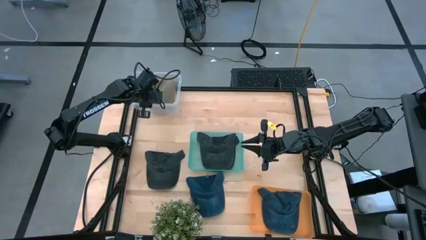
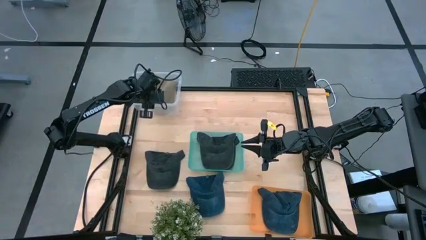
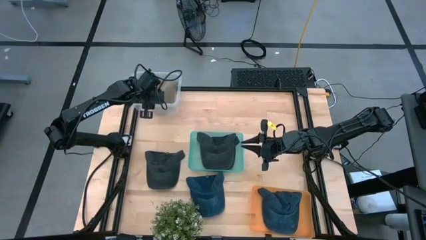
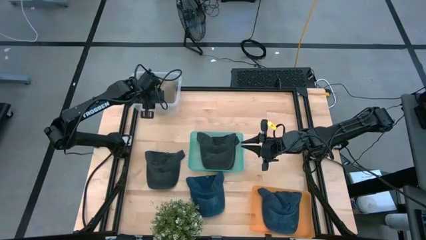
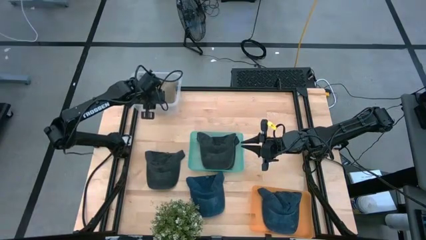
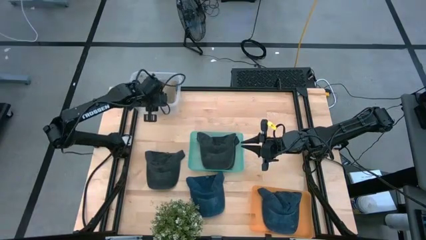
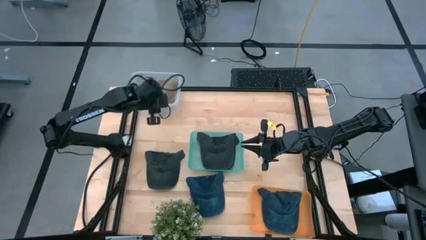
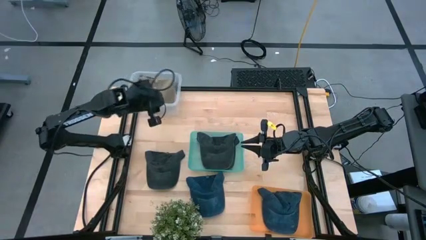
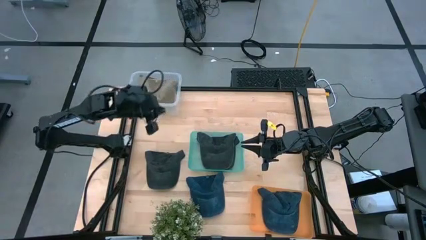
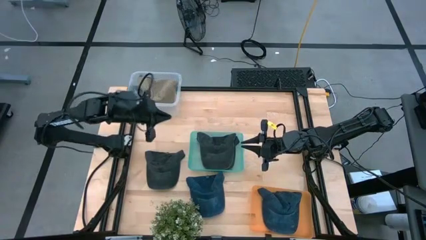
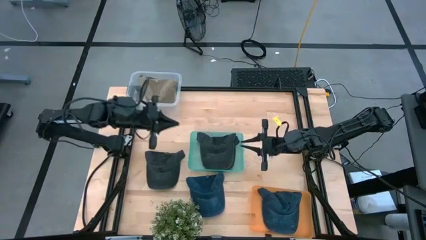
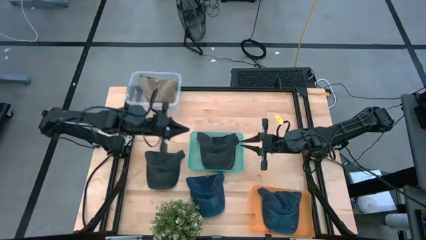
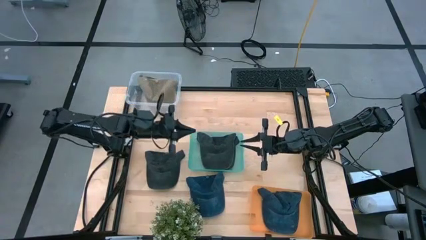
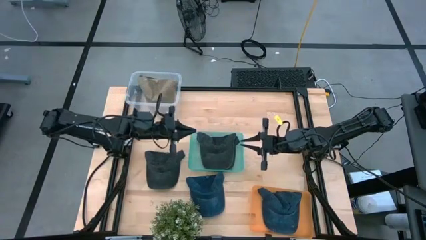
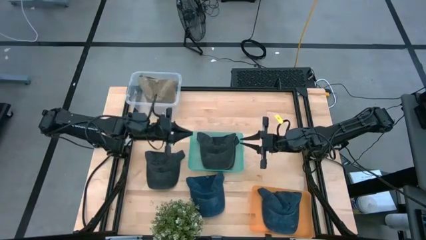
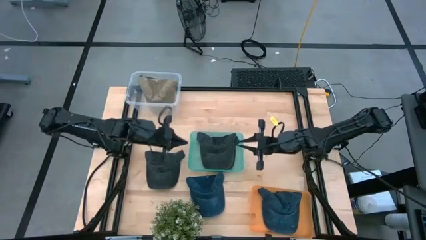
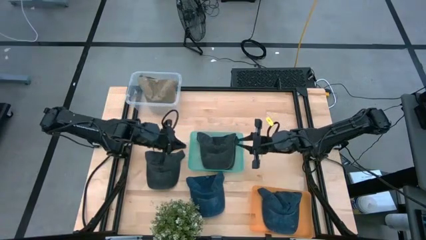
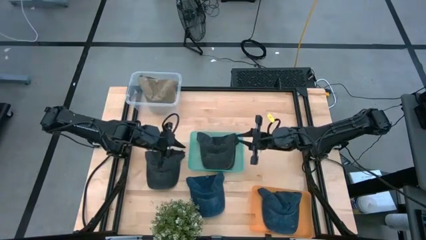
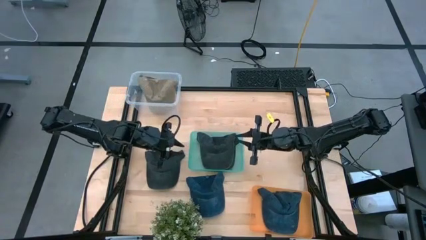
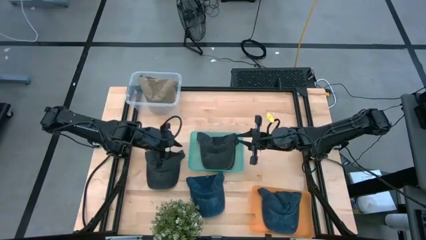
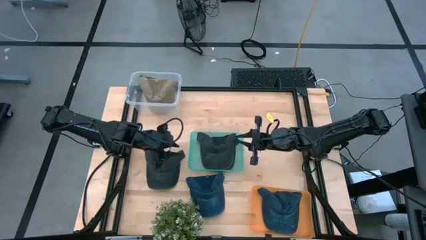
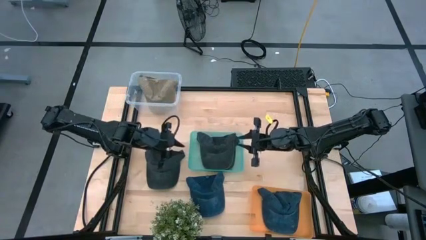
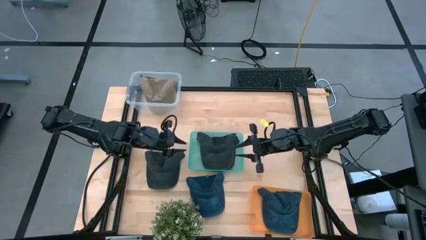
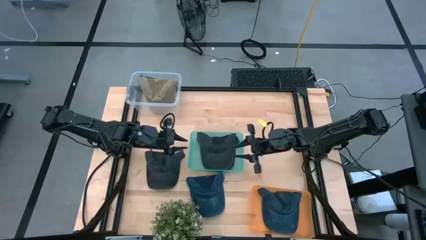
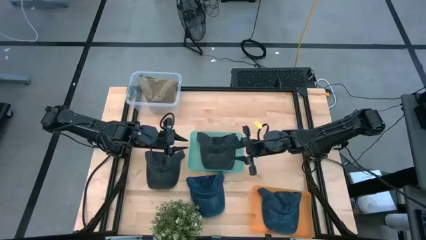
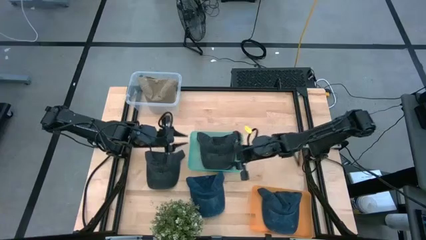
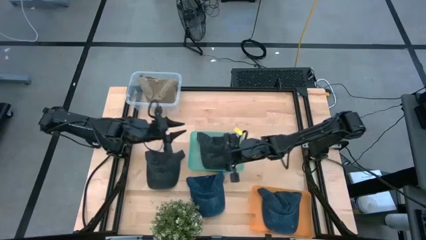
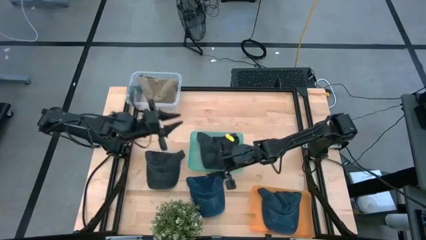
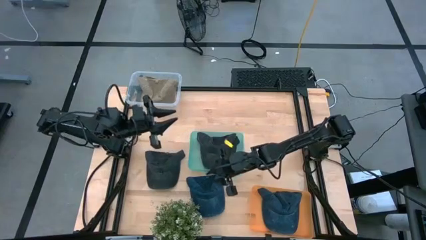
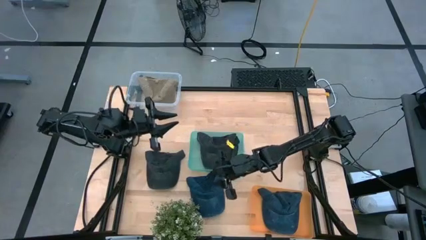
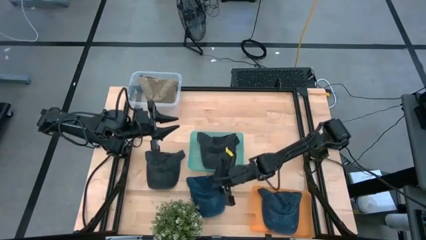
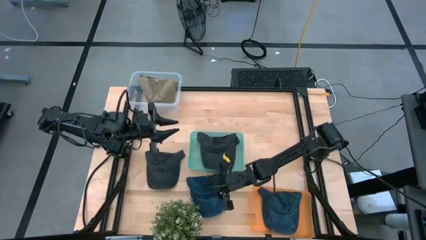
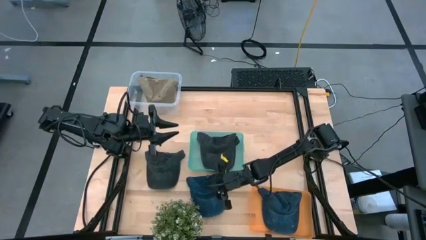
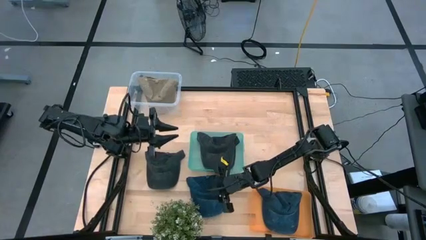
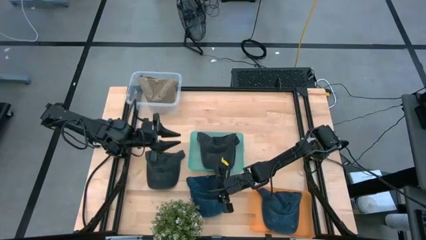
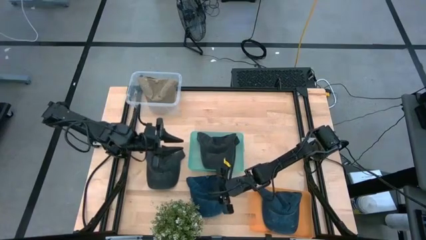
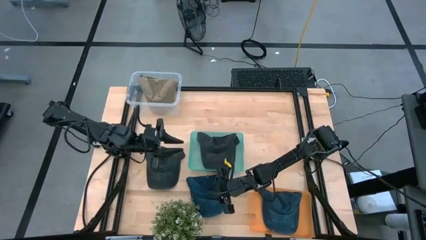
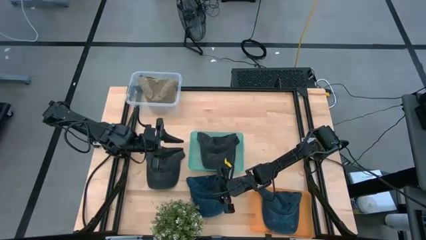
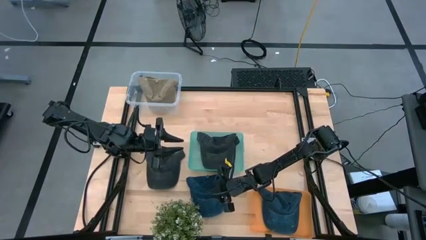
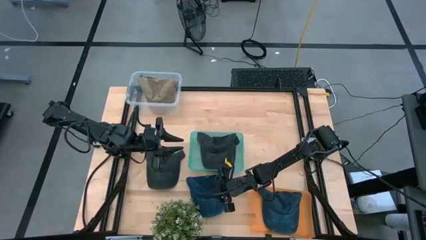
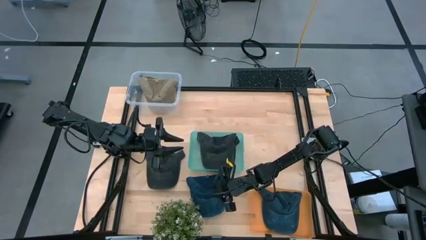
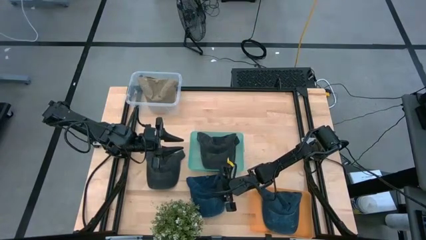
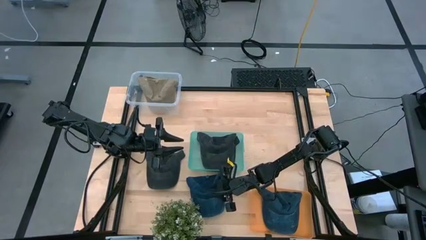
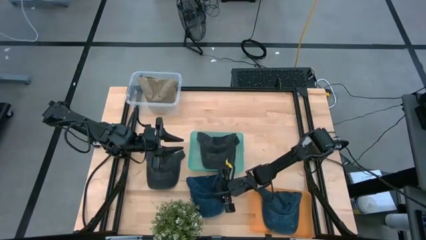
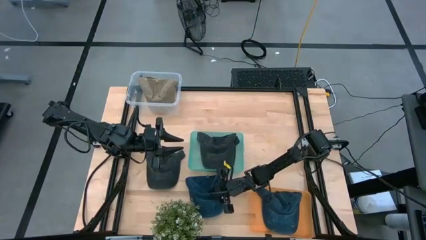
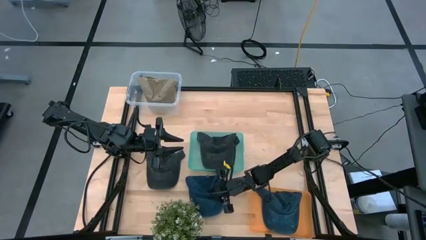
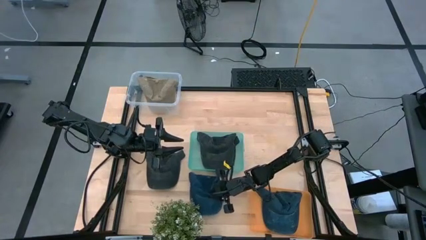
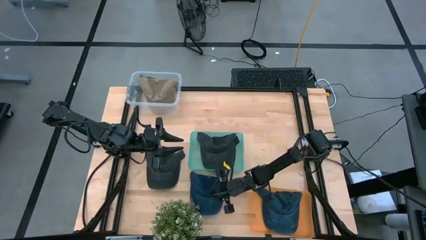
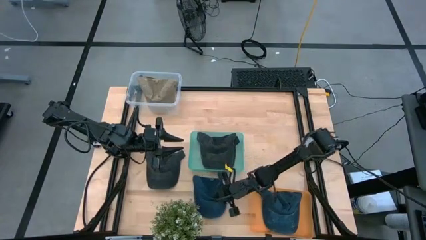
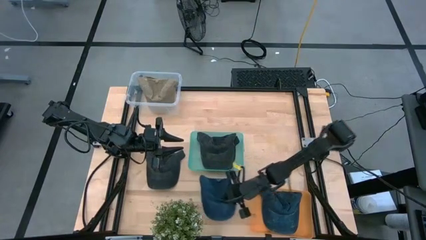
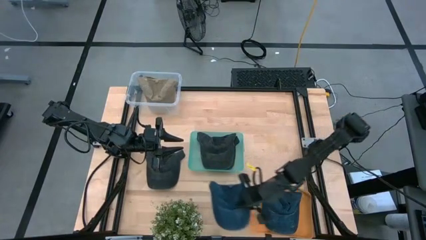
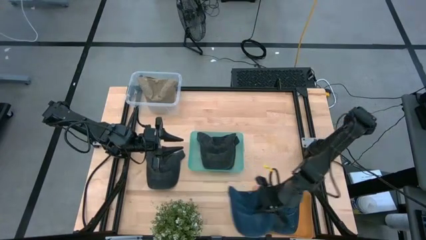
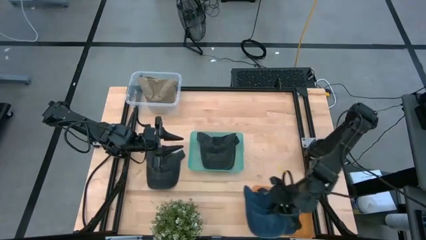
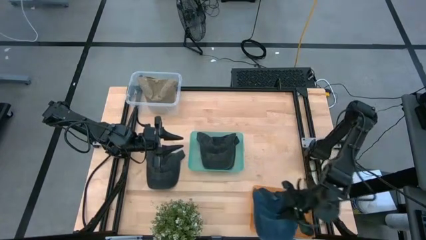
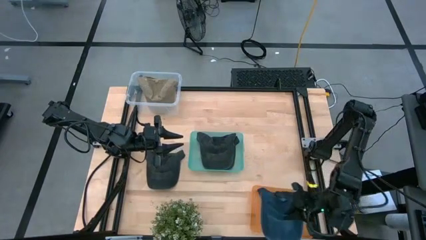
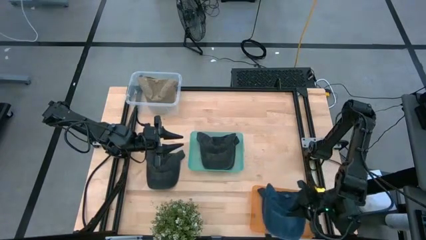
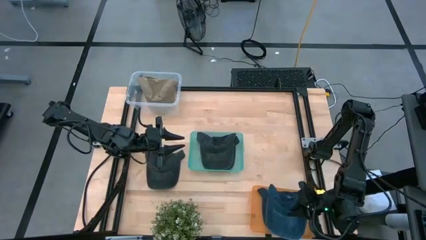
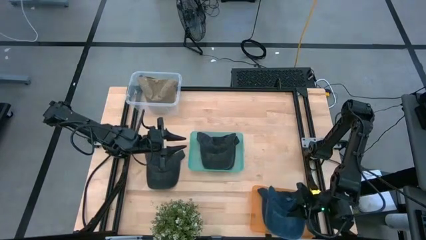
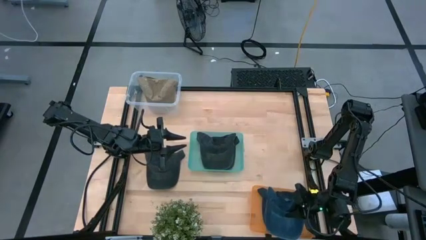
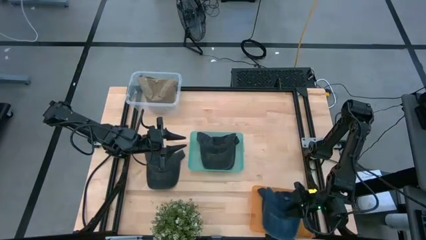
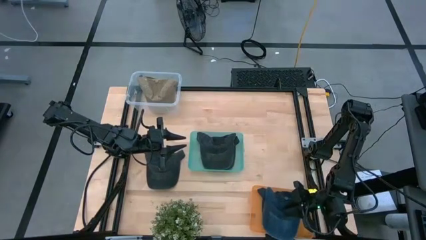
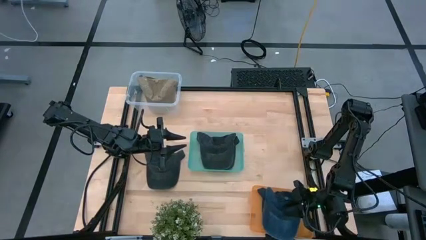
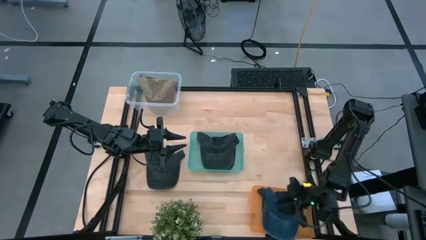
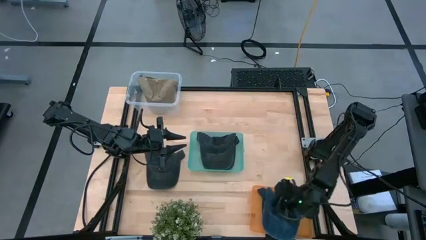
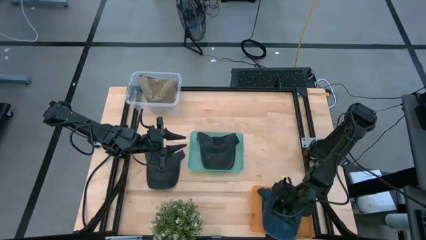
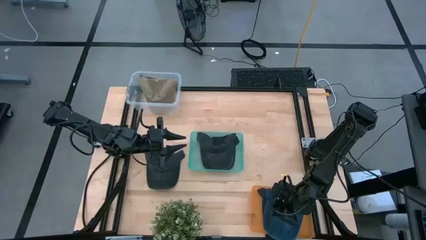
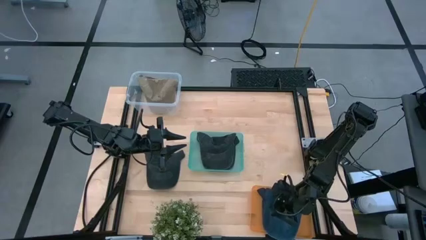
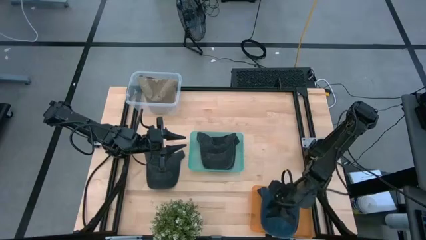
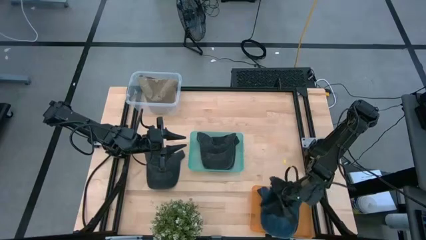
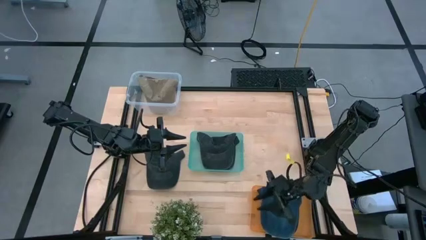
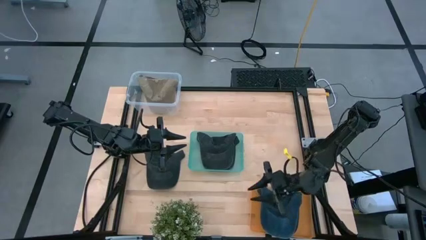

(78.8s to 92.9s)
Task: Pick & Place hat
Put the blue cap into the orange bin
